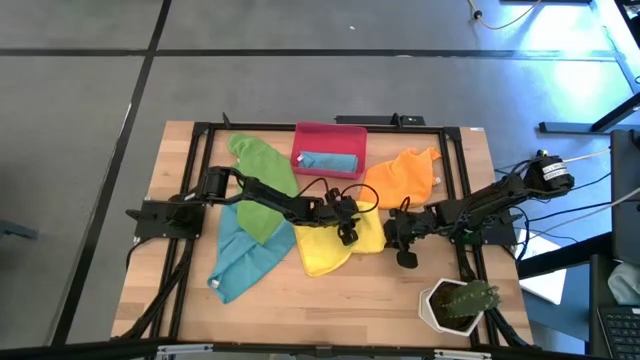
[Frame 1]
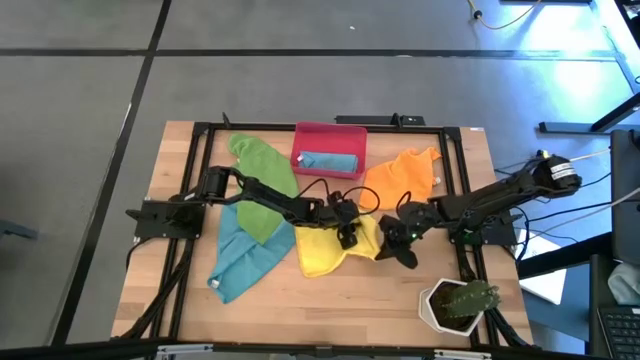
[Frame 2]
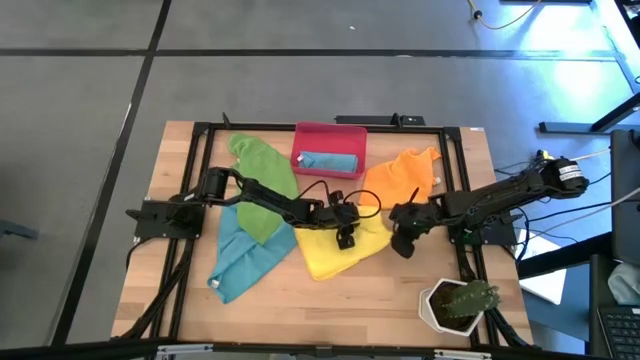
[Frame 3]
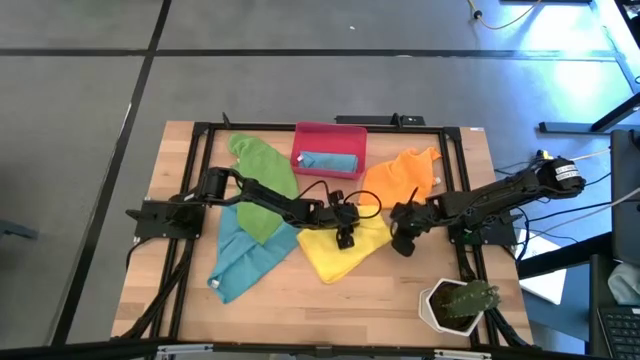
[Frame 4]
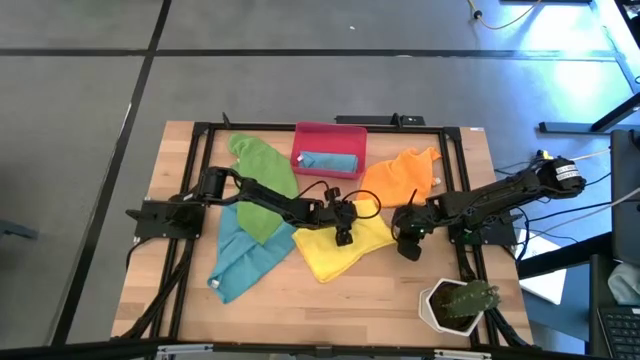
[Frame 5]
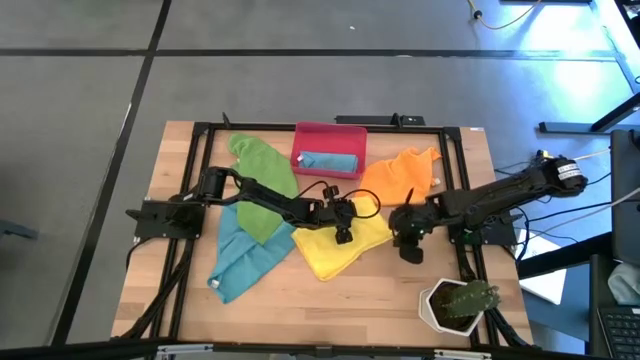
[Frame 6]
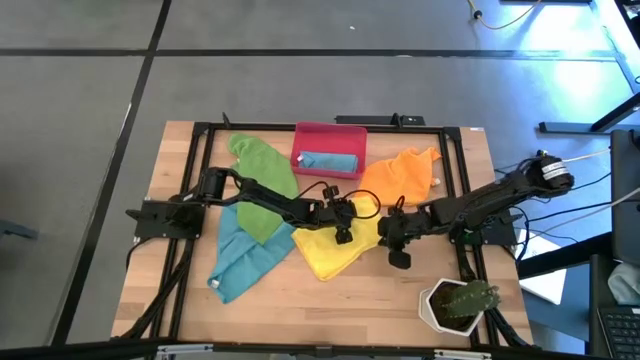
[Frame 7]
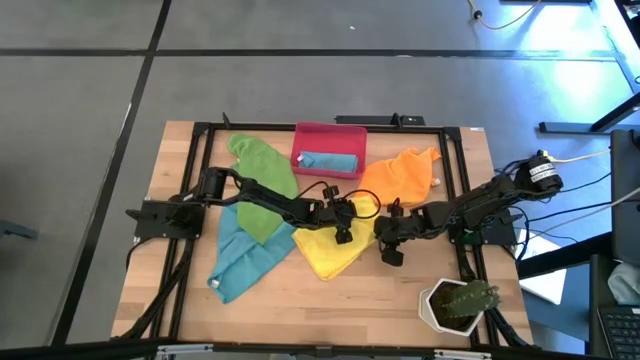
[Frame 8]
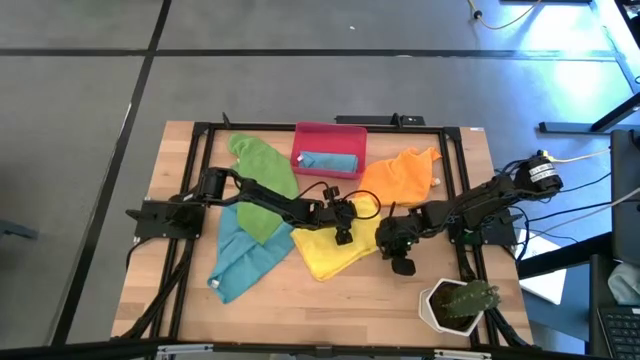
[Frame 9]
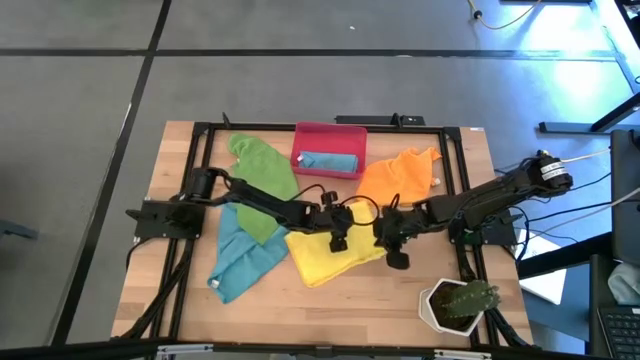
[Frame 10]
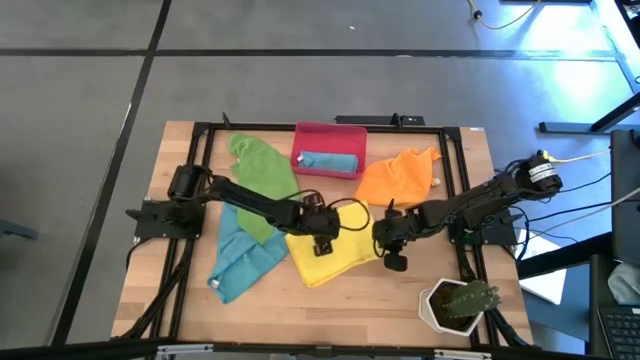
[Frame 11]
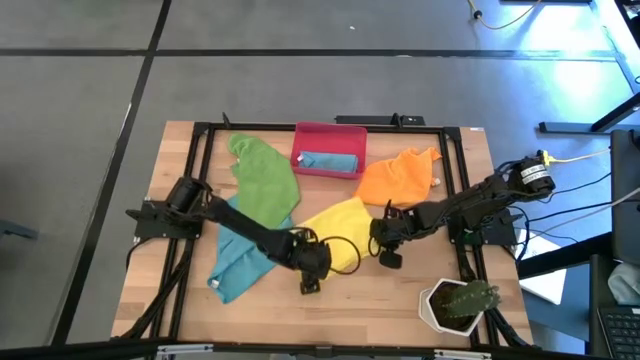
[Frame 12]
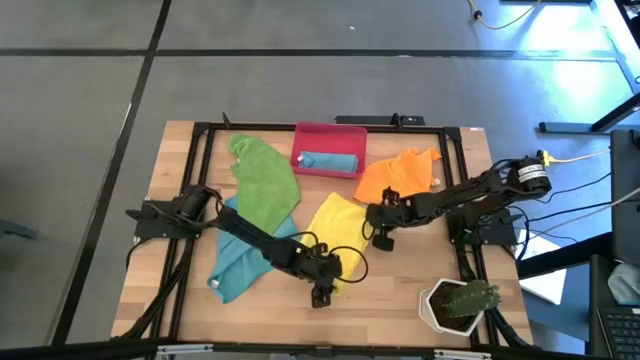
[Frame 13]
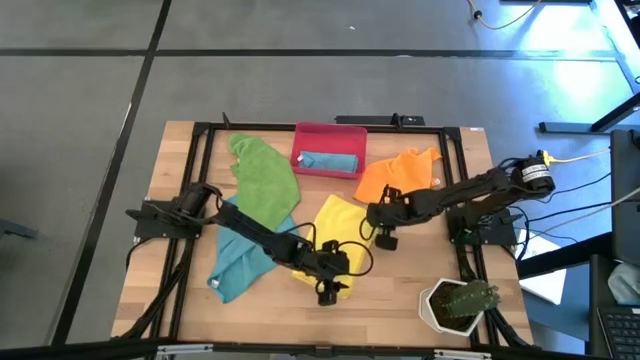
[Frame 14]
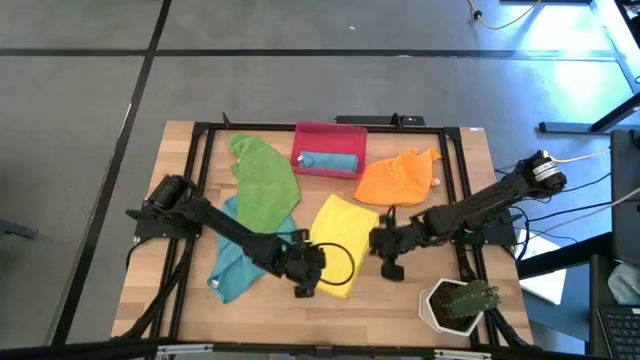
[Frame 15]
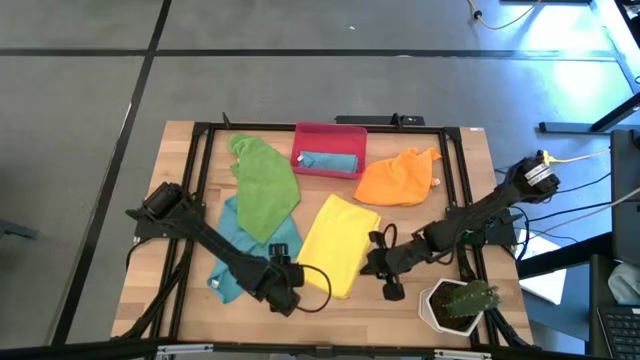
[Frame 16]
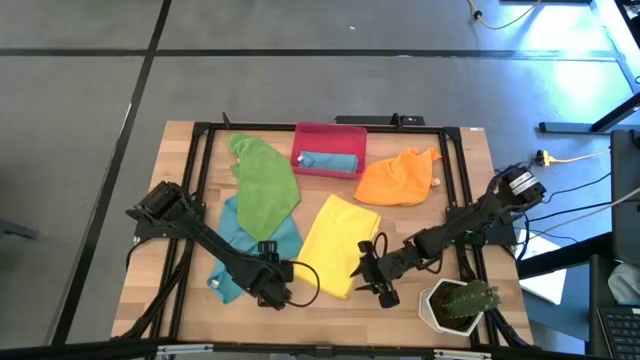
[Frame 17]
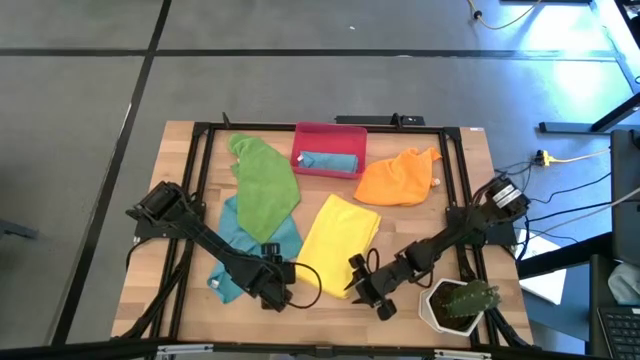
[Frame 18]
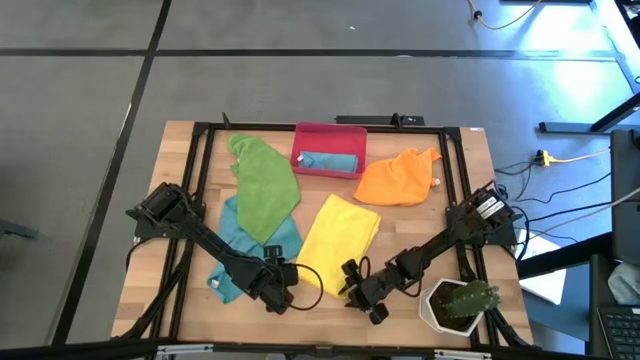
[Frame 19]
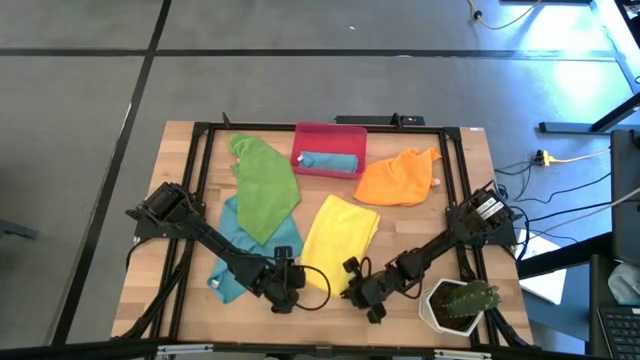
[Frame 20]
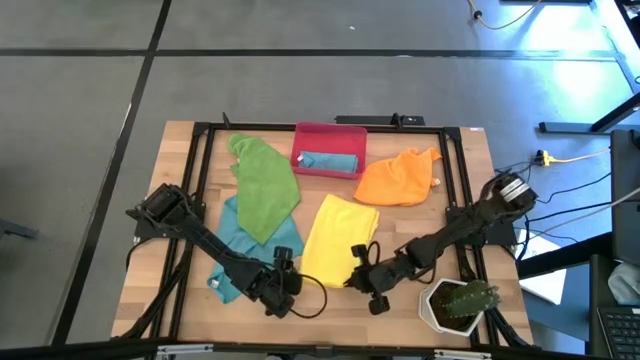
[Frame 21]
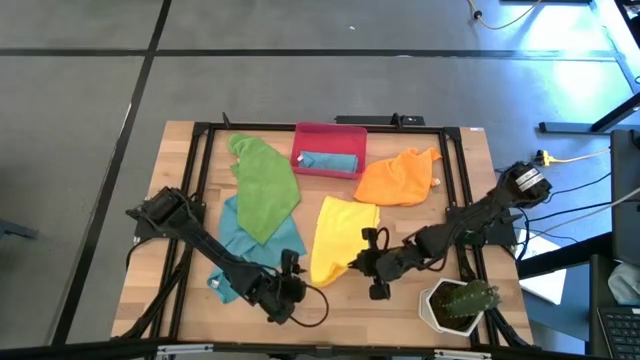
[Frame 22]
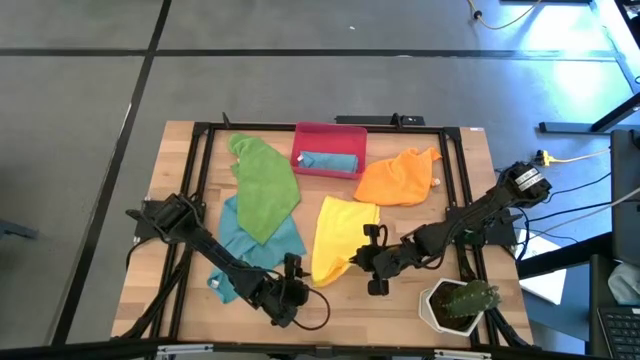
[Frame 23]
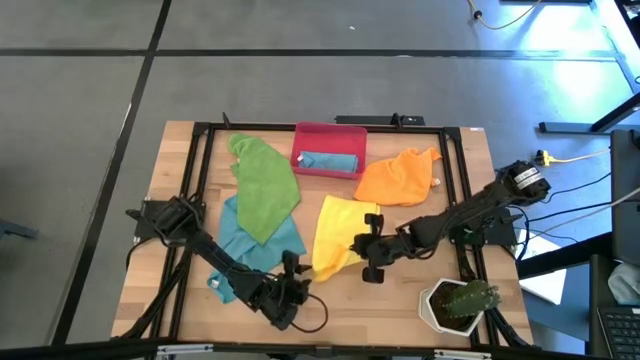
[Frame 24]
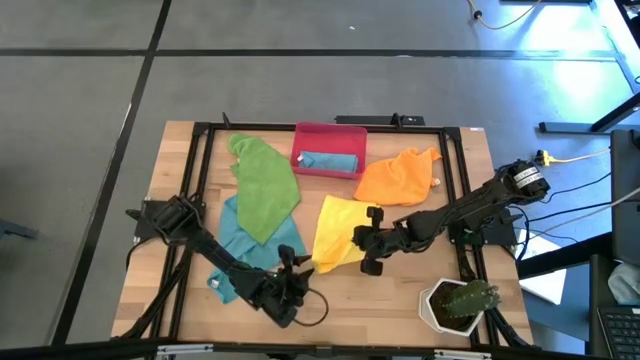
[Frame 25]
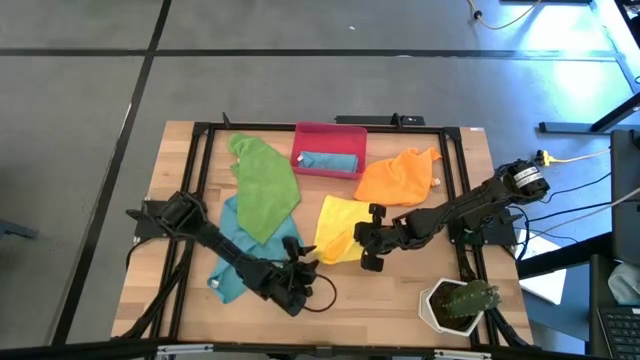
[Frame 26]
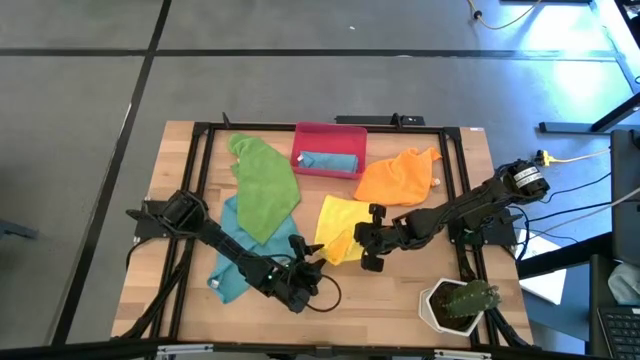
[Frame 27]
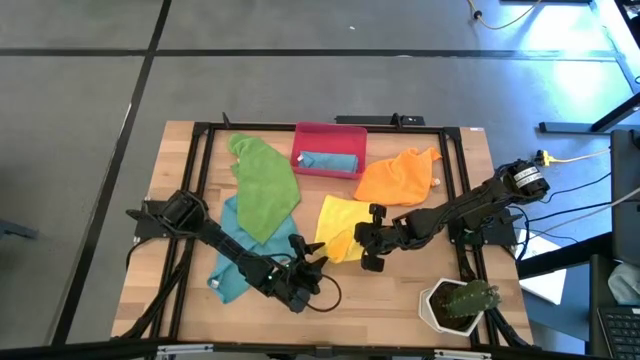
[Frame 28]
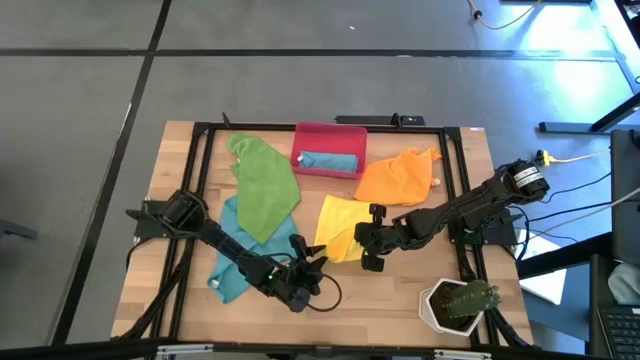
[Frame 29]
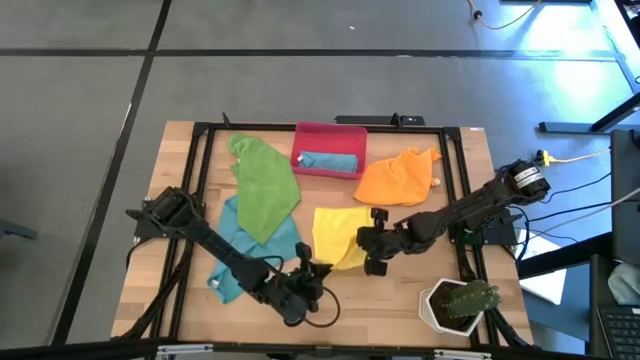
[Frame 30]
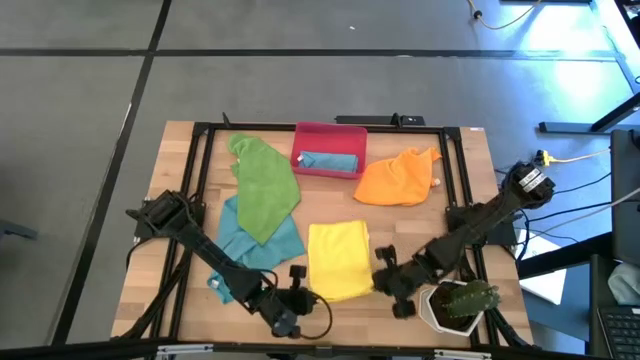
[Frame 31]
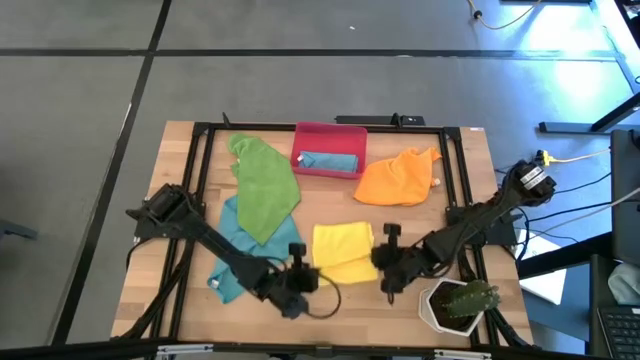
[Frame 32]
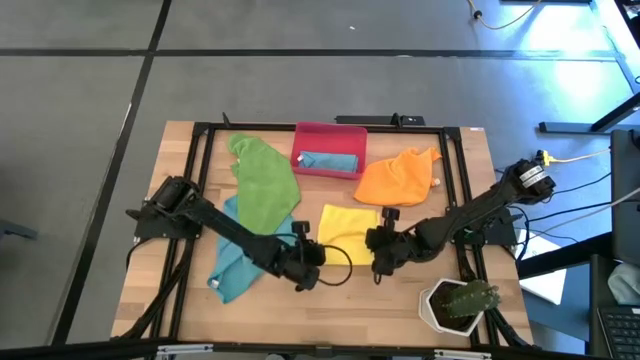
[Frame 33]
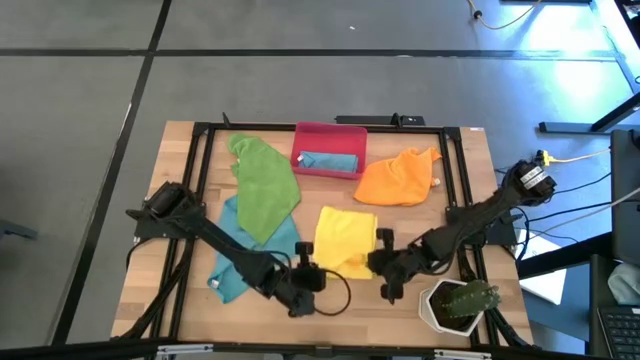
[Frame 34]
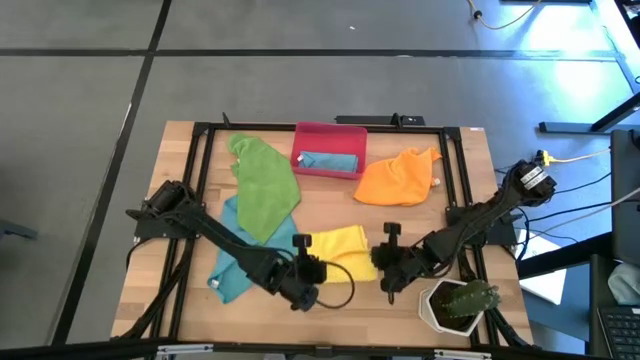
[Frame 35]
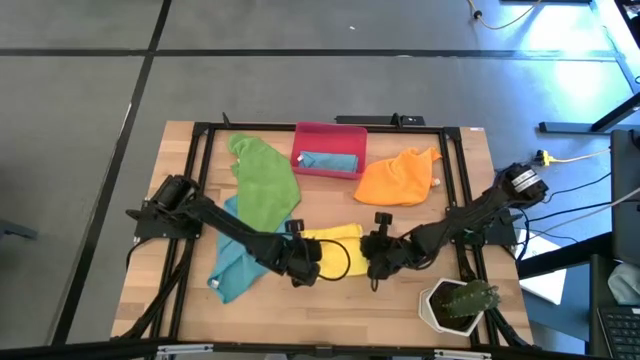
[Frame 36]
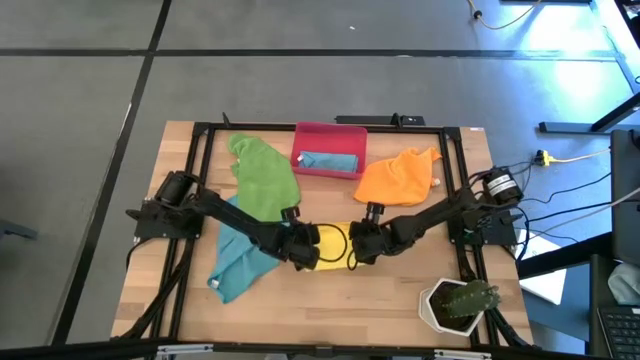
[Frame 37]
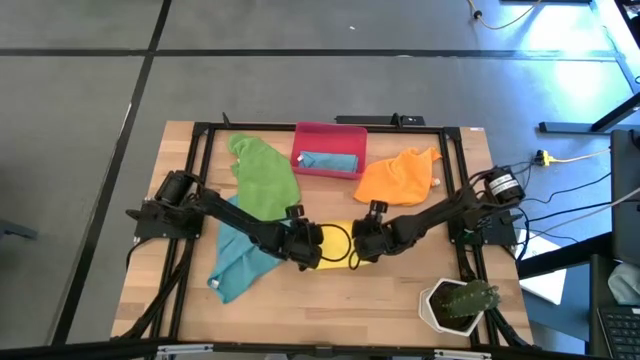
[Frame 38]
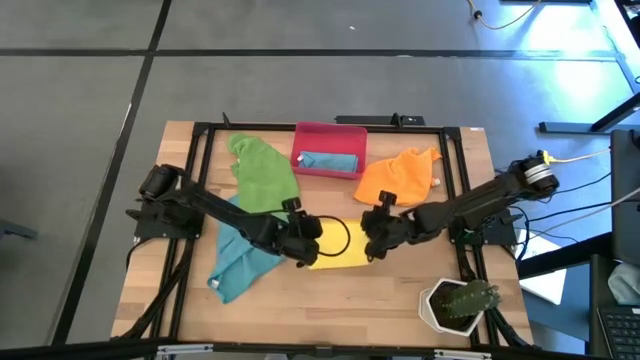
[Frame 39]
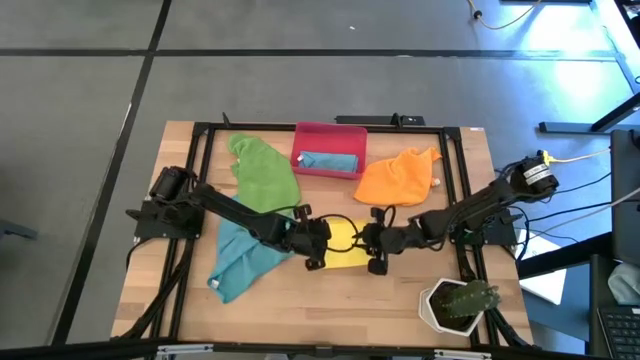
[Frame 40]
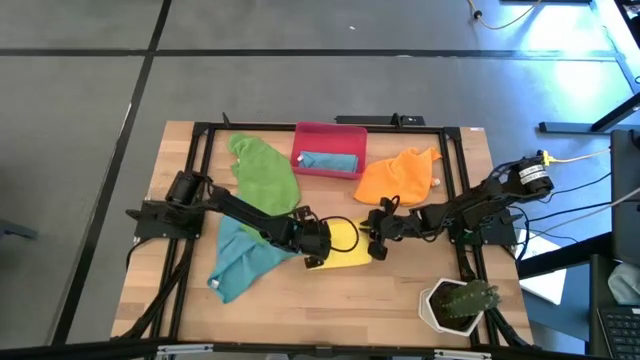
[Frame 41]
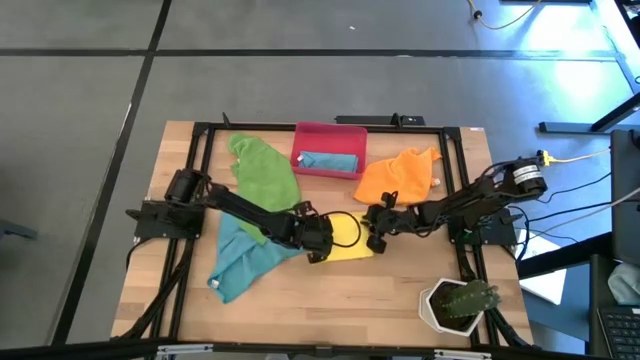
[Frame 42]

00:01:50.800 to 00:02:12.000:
Task: Roll microfiber towels into tight, uniform cylinder then place into a basket
Fold the yellow microfiber towel
